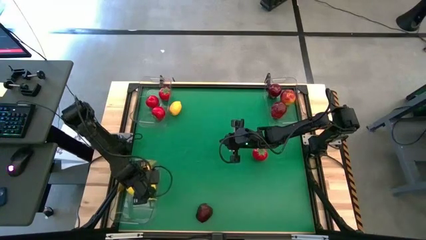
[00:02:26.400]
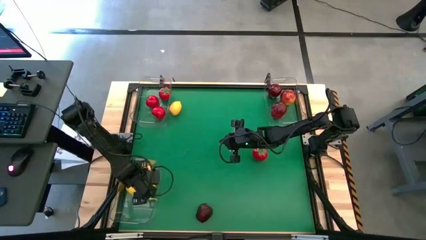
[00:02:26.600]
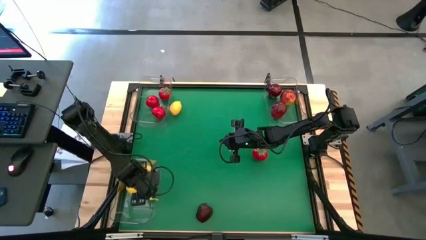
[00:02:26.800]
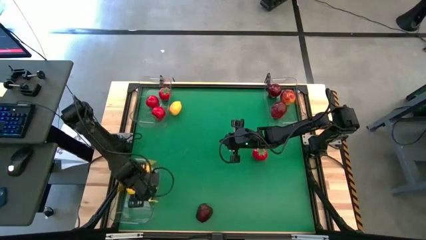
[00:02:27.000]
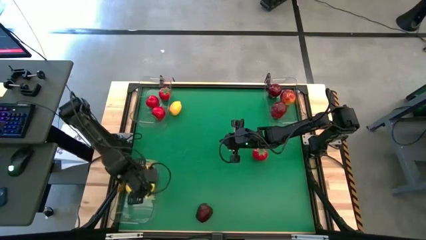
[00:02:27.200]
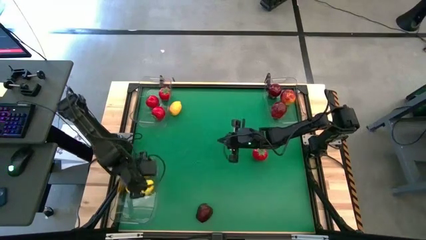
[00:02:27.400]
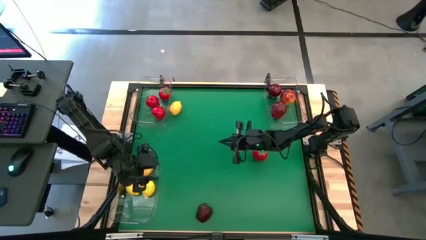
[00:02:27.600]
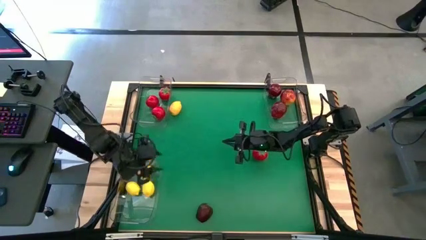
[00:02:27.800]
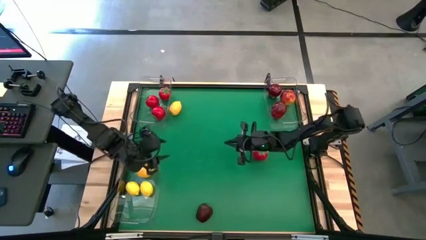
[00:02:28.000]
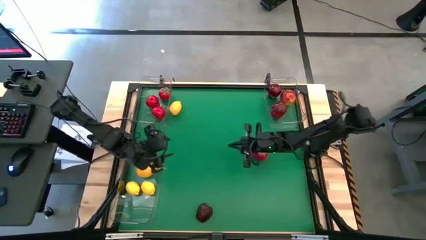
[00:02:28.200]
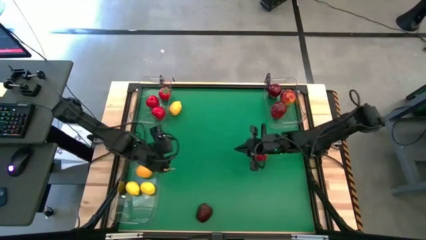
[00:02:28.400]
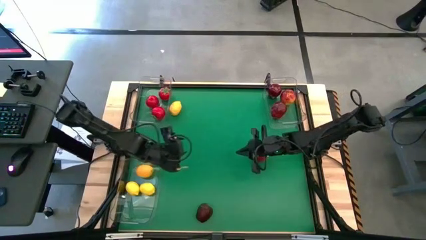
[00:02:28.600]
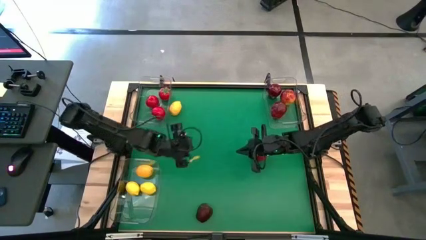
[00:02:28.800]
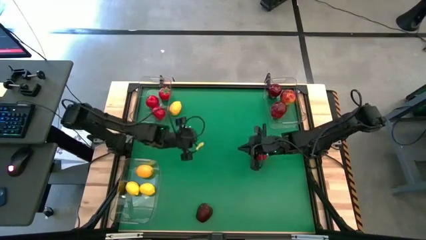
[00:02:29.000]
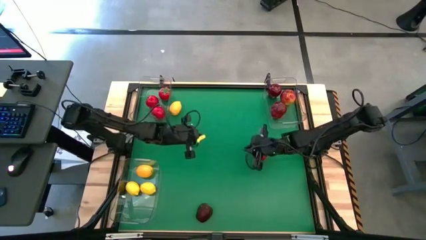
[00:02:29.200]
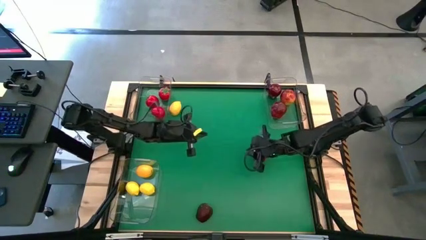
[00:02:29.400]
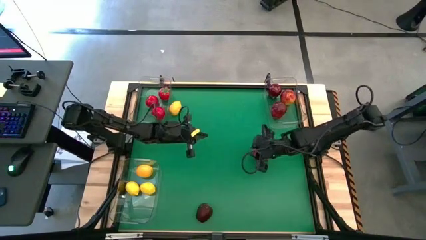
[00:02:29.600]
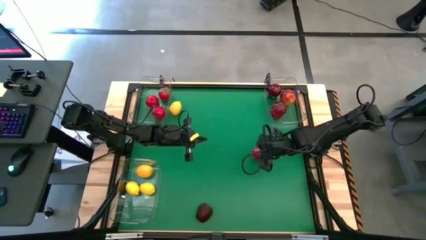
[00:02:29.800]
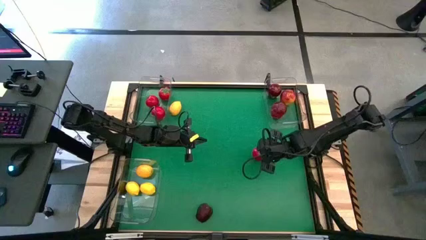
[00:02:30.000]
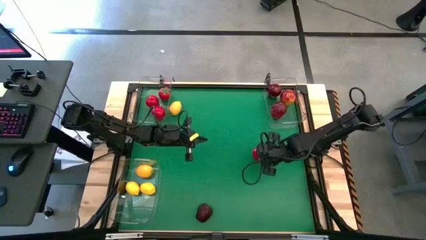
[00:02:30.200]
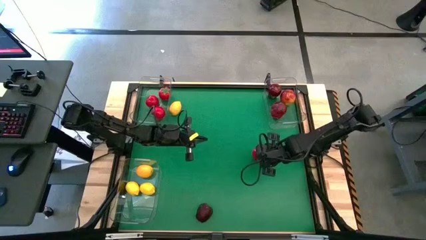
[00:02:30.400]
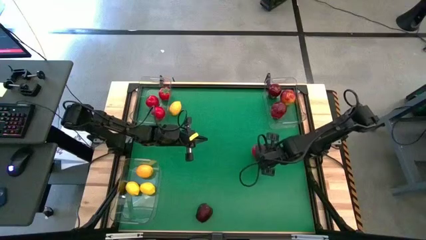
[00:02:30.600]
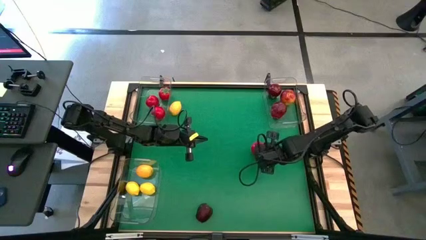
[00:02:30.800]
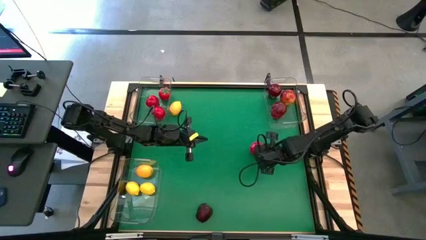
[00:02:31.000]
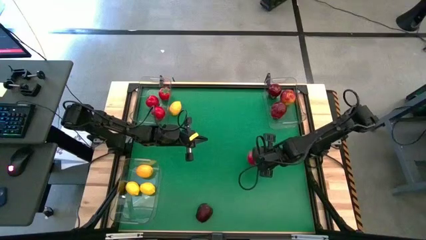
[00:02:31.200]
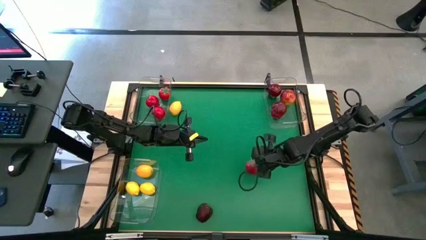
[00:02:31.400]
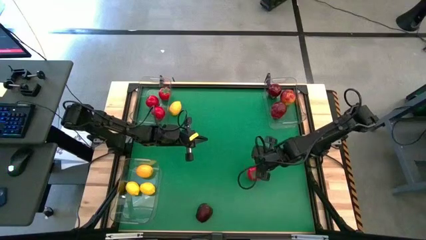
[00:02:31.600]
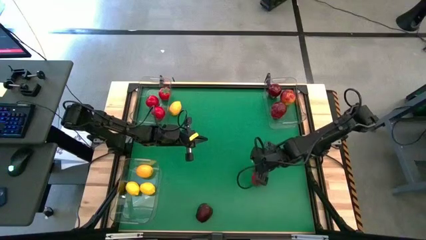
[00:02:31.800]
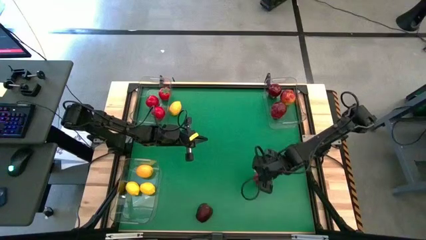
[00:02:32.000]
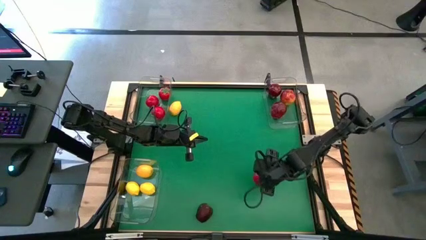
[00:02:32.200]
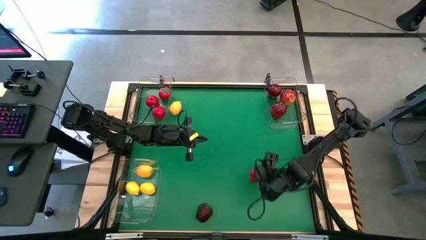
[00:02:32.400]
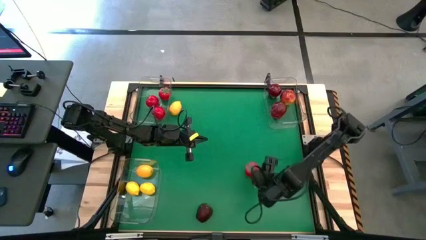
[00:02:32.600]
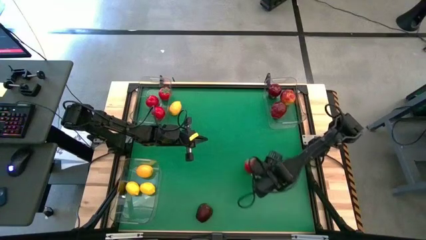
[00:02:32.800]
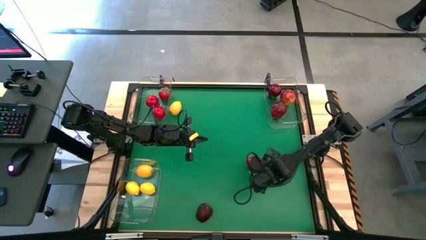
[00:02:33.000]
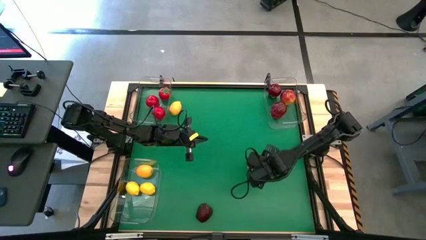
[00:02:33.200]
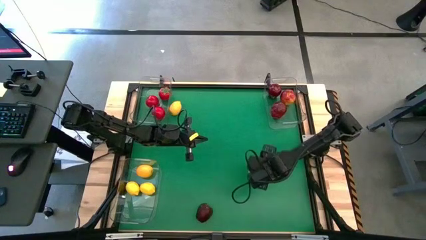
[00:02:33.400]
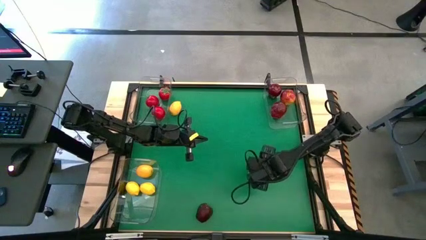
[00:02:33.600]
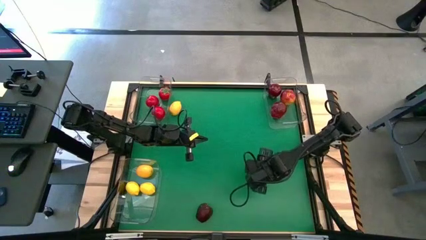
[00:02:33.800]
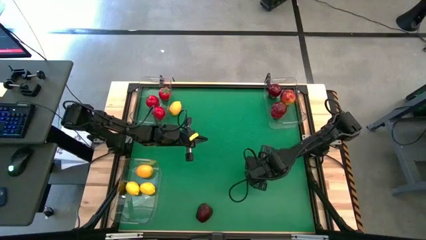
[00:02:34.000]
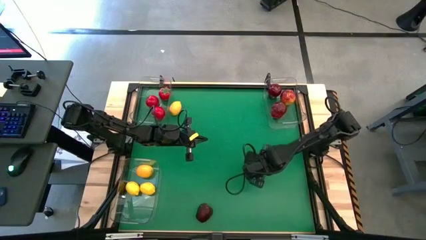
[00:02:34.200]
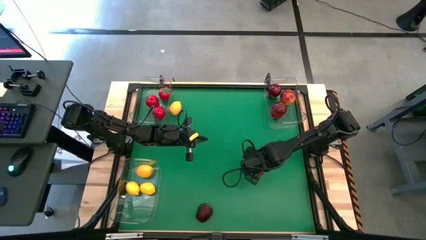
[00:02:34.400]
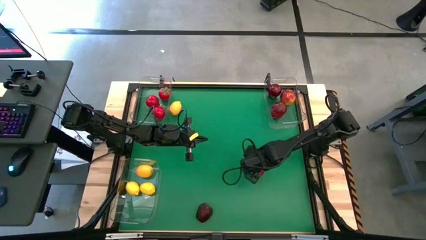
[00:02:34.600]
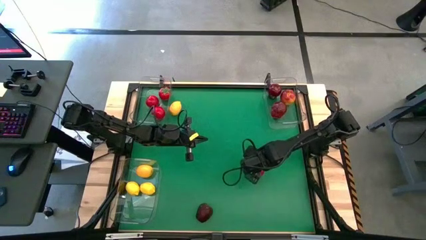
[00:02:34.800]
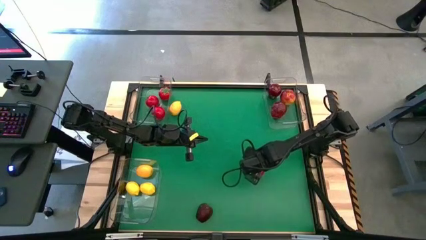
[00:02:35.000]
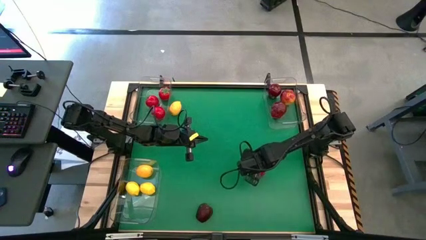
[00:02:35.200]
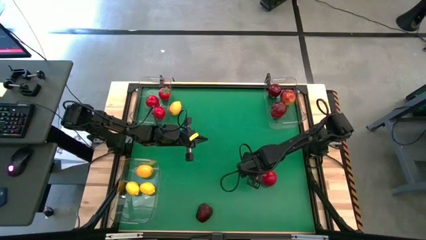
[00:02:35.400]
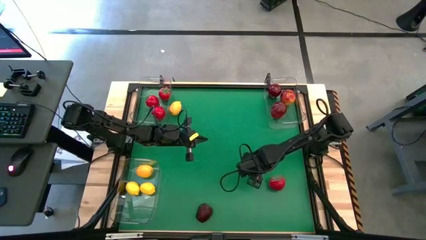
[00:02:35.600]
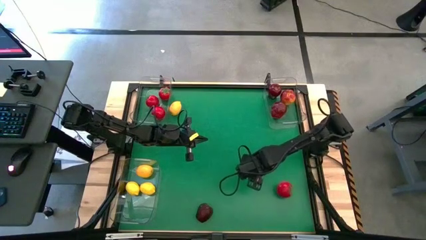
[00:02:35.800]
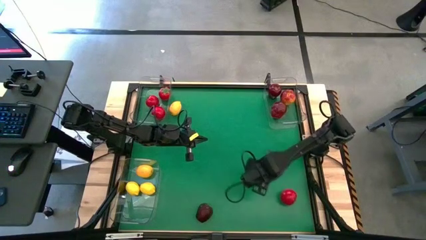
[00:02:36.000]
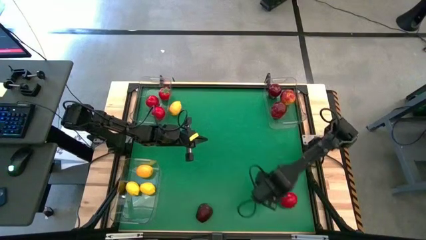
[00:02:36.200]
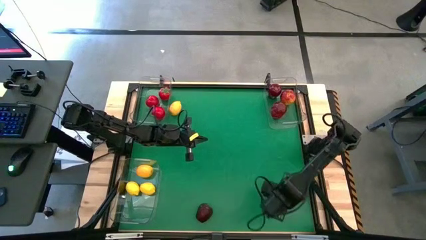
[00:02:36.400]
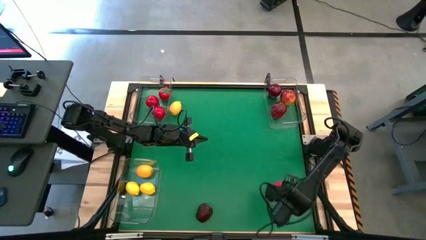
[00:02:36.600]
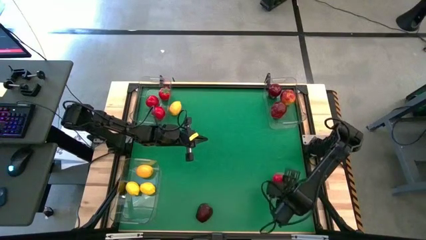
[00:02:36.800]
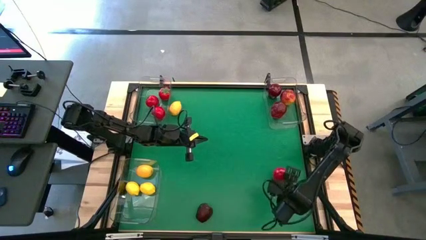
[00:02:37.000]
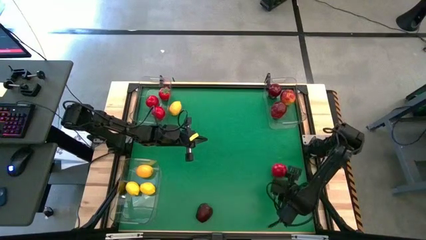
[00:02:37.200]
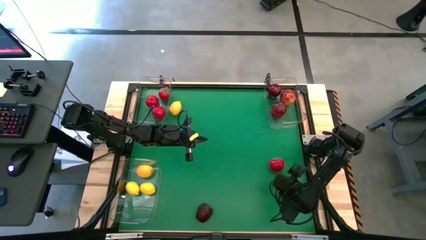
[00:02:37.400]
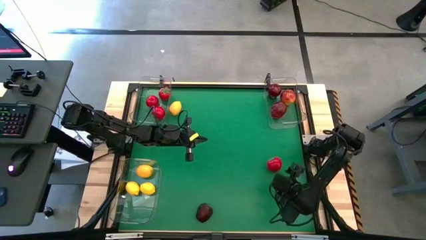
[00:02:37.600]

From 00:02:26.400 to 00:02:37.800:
Task: Sort produce into baskets
Put the tomato into the top left bin

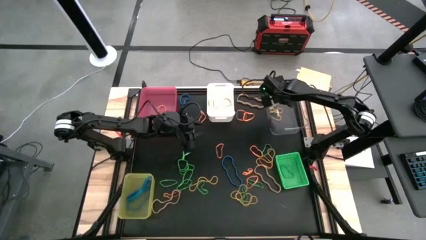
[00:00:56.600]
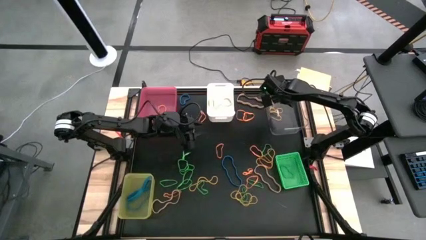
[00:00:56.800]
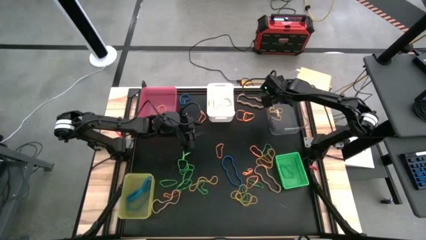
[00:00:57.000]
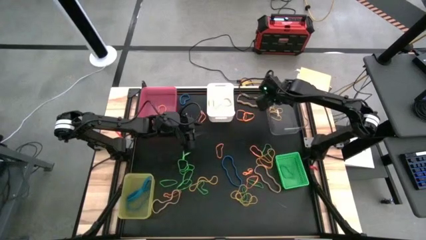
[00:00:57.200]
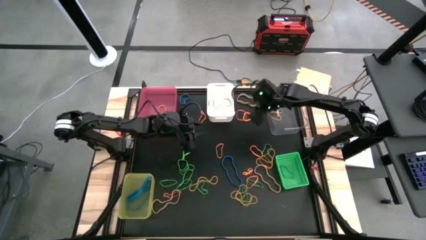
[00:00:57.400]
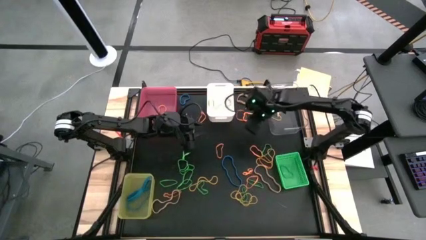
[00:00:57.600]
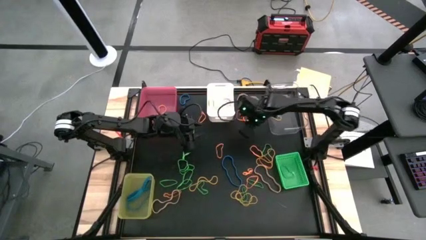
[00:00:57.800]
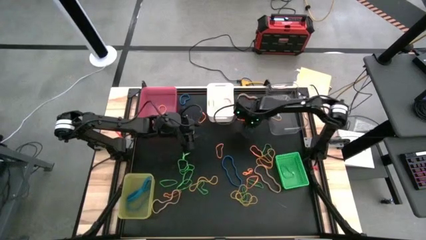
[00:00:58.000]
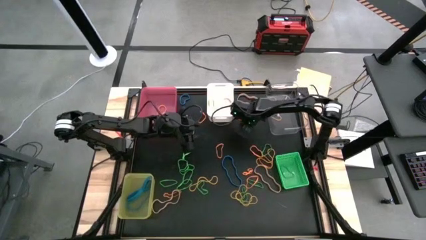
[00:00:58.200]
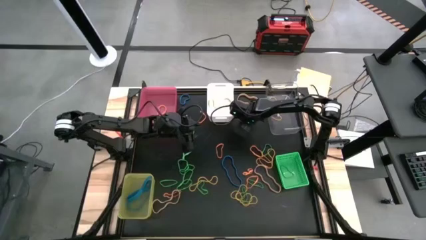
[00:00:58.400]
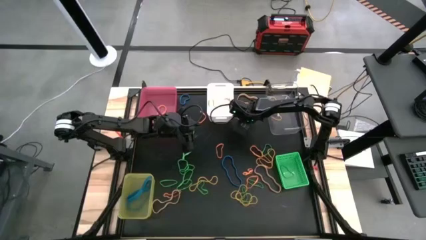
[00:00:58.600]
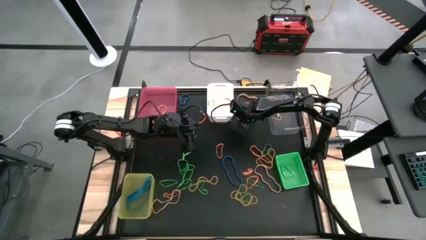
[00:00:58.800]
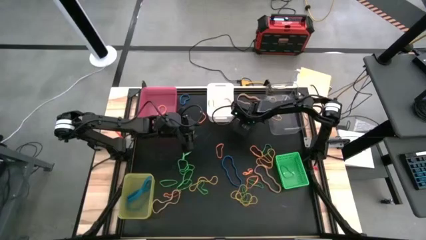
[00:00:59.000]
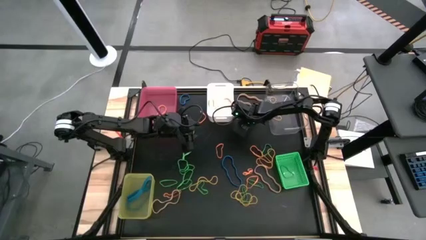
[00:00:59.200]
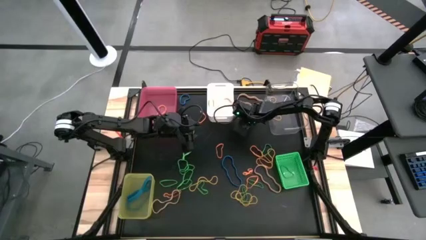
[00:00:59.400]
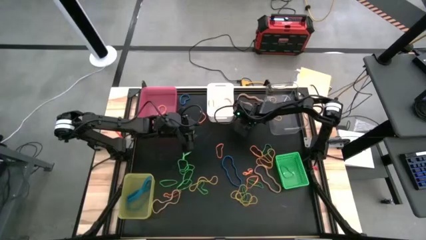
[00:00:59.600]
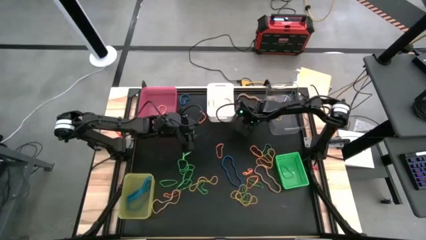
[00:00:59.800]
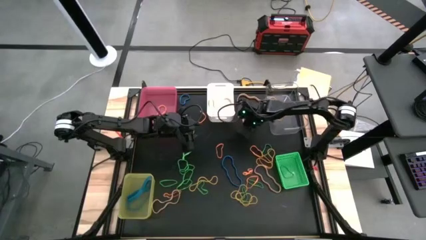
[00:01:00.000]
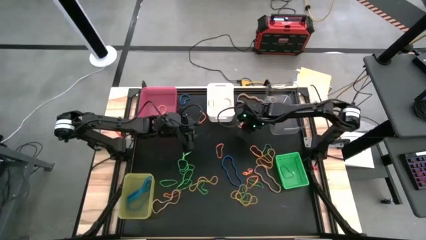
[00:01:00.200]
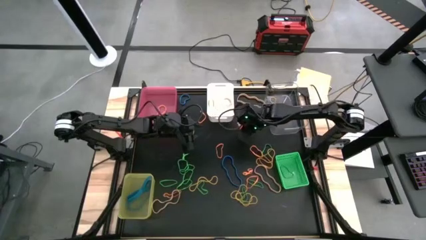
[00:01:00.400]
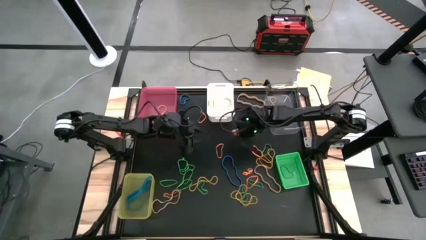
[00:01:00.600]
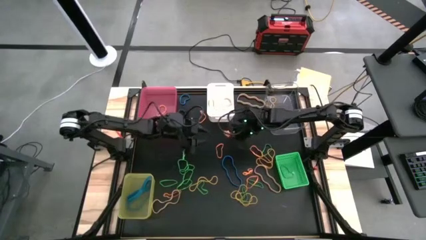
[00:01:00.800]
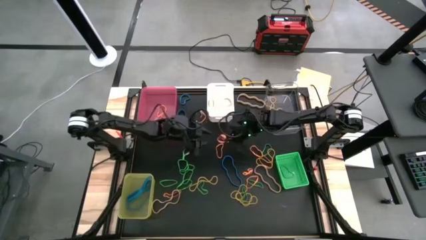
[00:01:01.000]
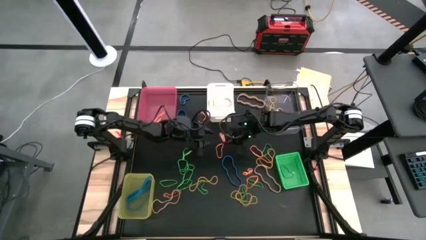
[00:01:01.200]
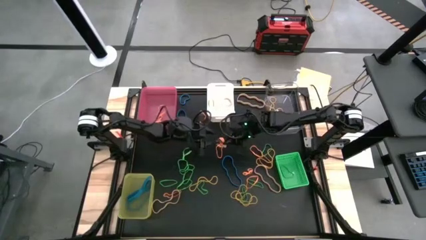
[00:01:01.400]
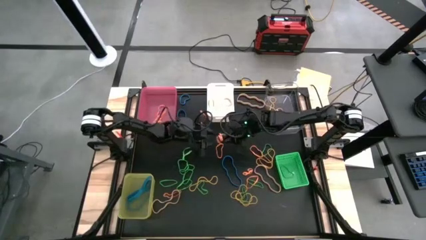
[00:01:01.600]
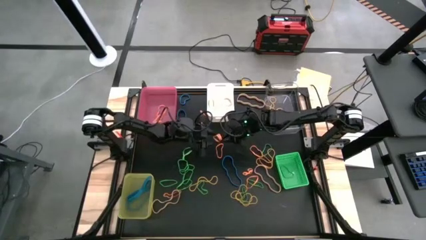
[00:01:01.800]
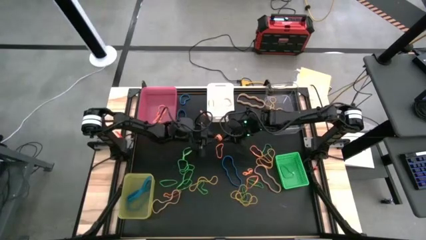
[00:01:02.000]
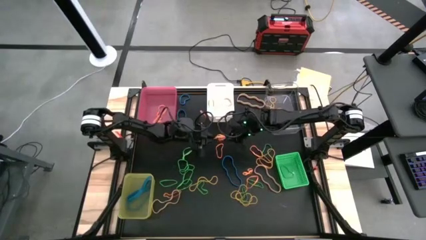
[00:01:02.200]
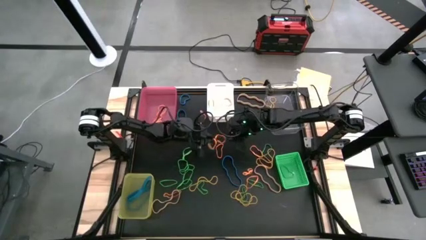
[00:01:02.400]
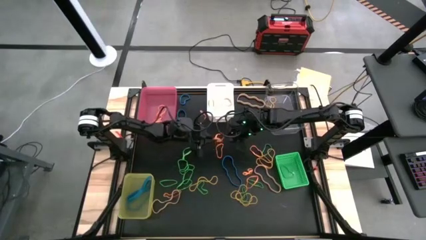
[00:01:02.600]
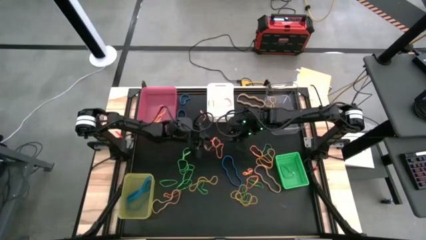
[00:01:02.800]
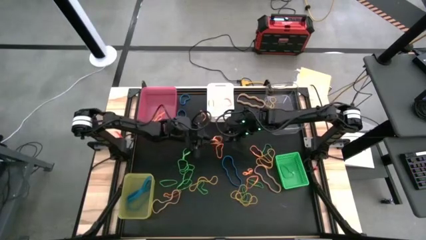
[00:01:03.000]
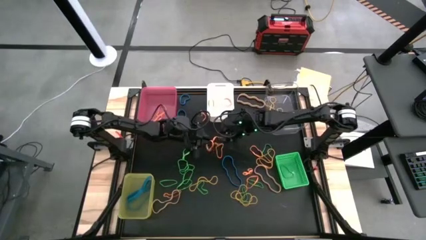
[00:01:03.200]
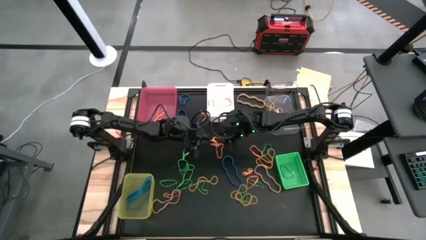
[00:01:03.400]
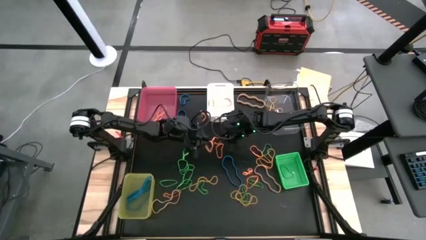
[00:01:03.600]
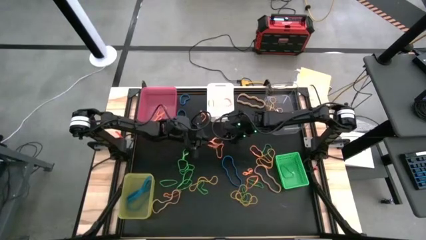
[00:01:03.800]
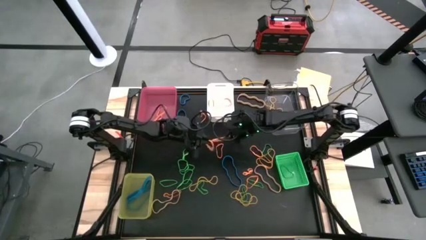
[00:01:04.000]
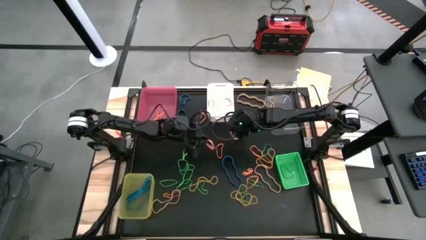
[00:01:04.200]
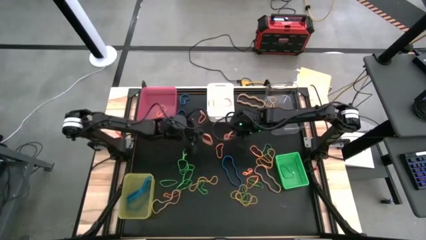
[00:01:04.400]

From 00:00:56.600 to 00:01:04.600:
Task: Sort rubber bands into baskets
Put the orange rubber band into the pink bin
